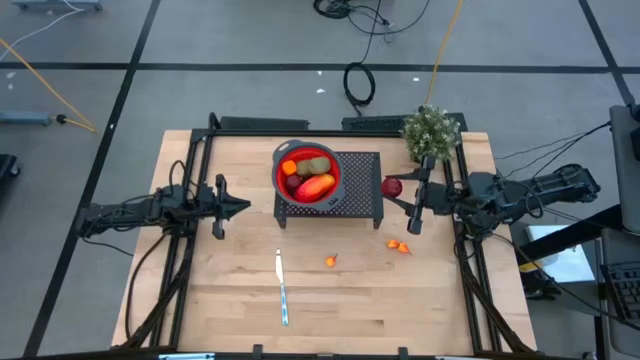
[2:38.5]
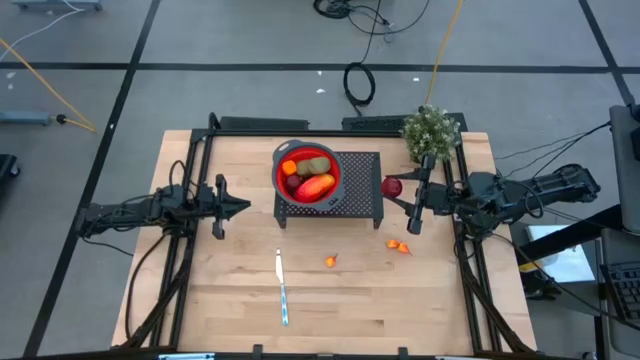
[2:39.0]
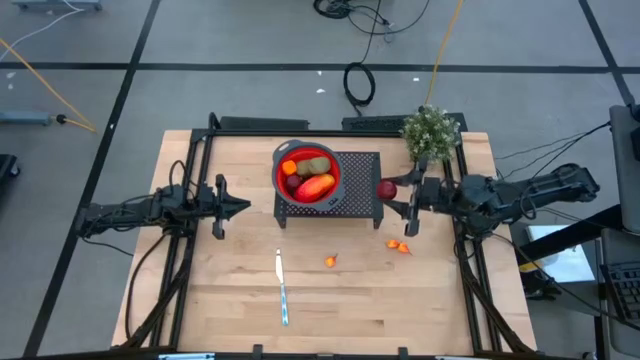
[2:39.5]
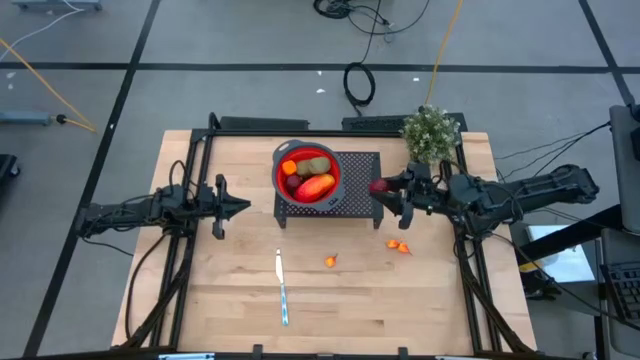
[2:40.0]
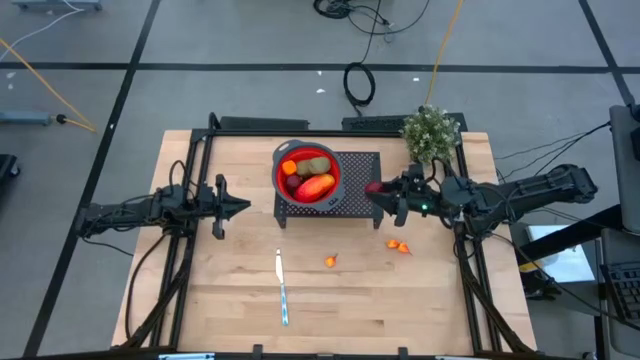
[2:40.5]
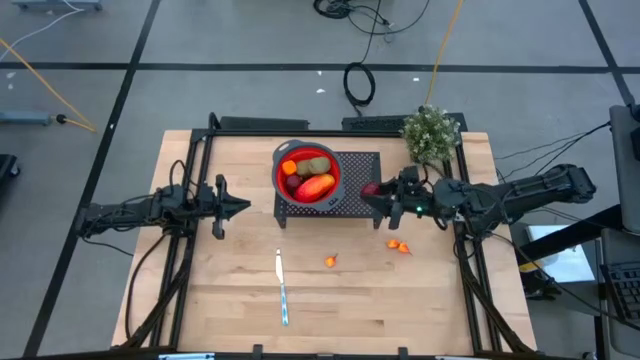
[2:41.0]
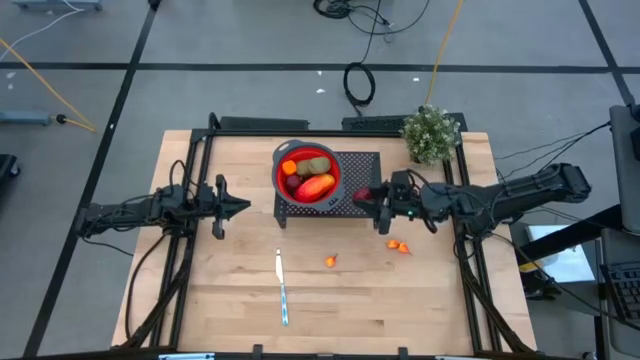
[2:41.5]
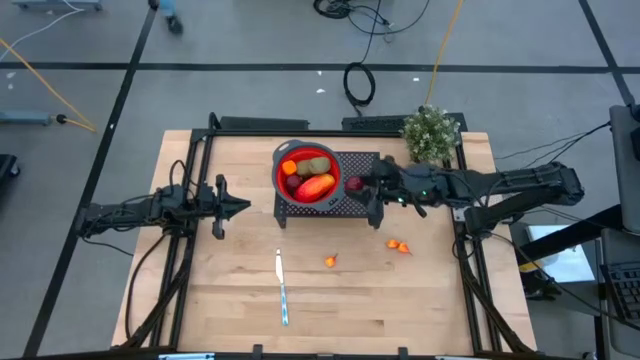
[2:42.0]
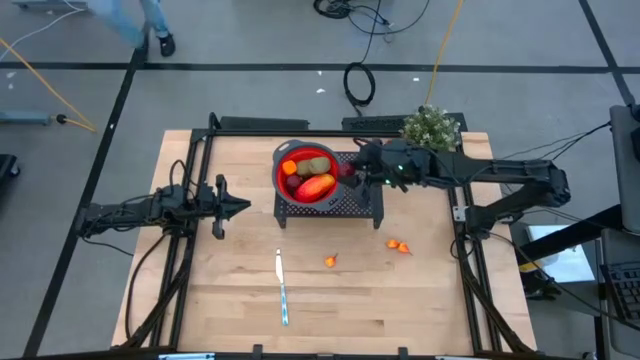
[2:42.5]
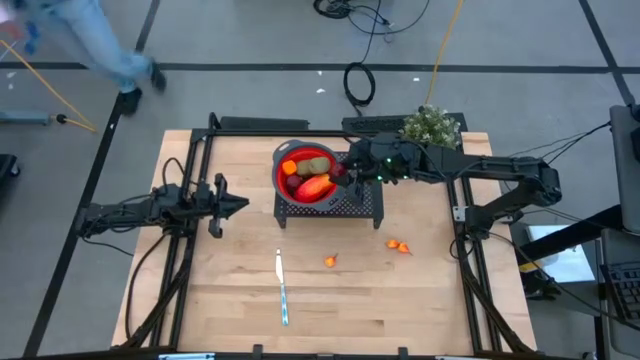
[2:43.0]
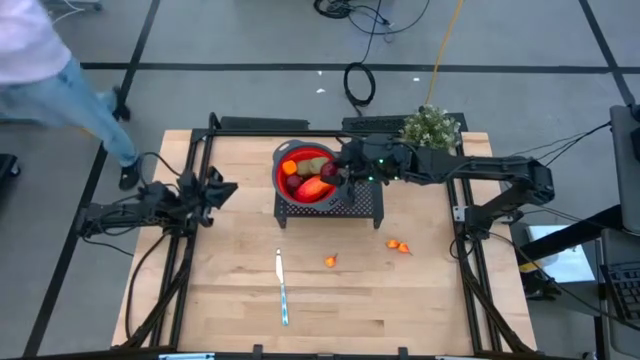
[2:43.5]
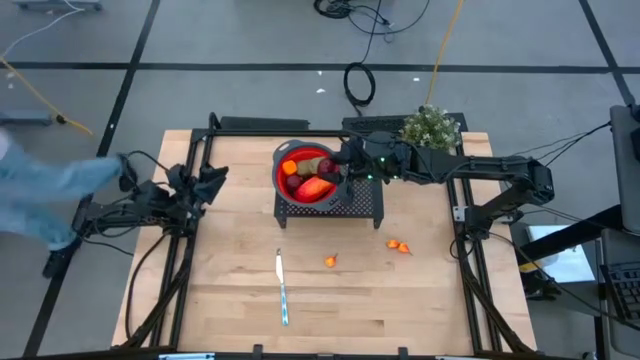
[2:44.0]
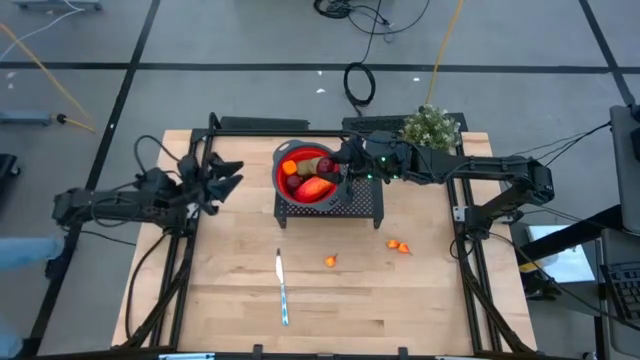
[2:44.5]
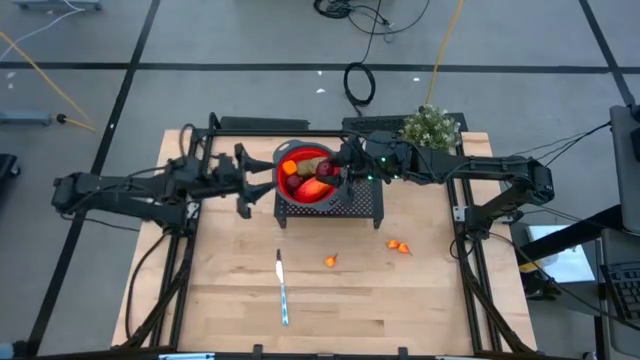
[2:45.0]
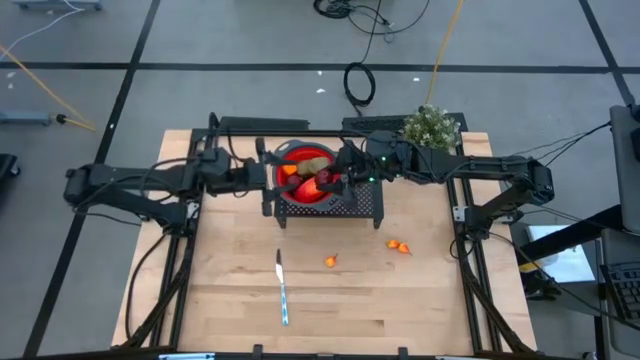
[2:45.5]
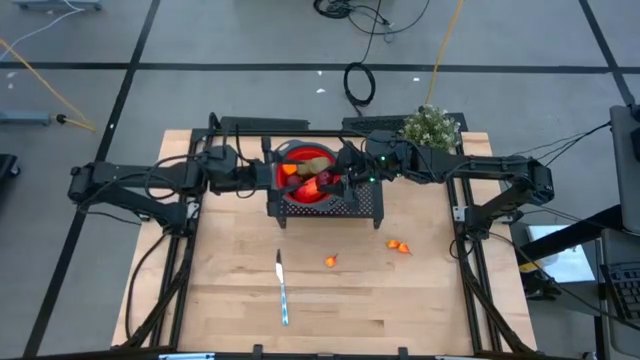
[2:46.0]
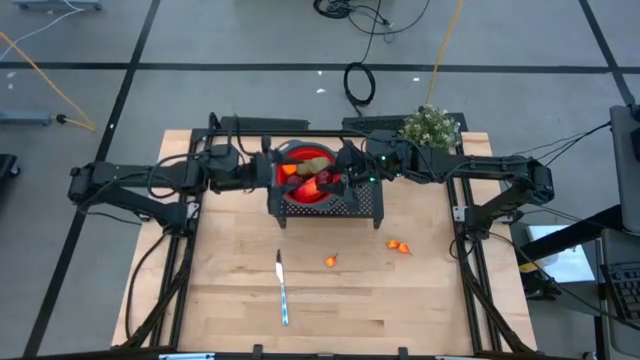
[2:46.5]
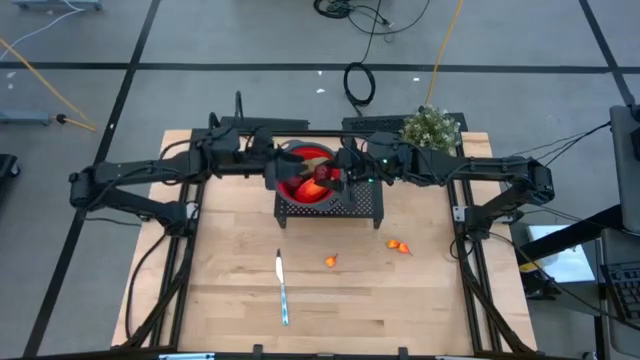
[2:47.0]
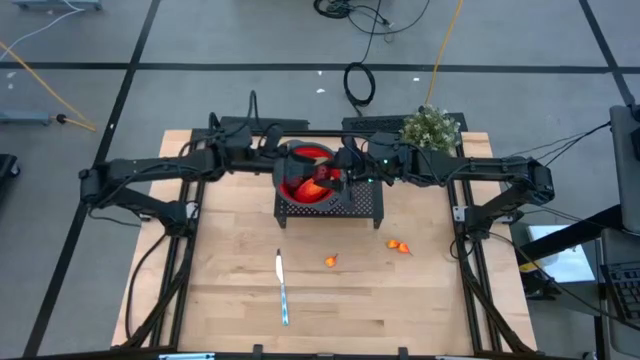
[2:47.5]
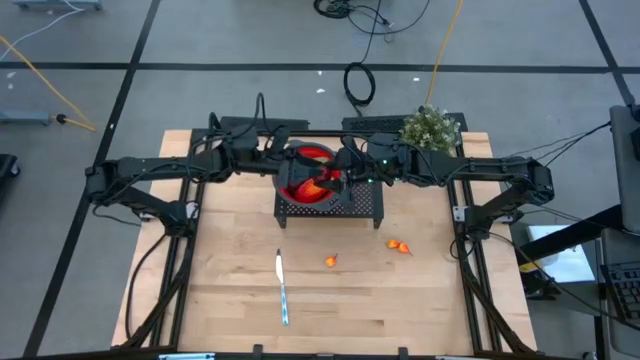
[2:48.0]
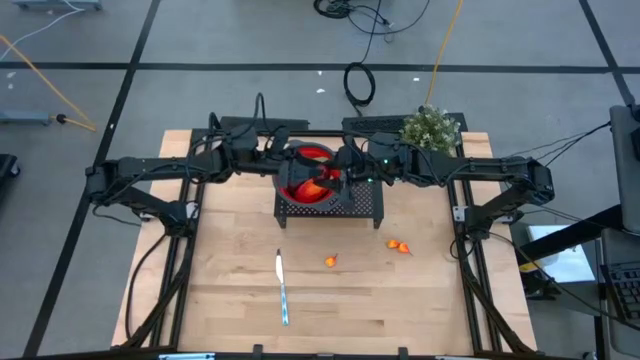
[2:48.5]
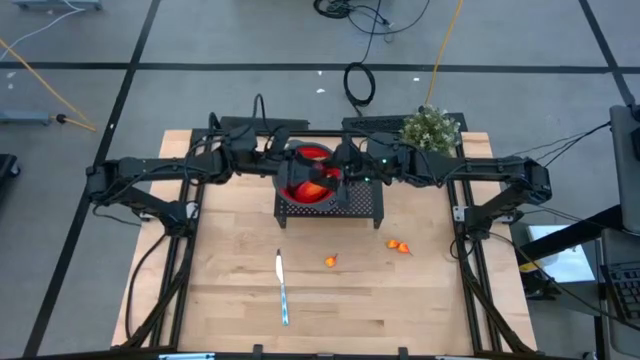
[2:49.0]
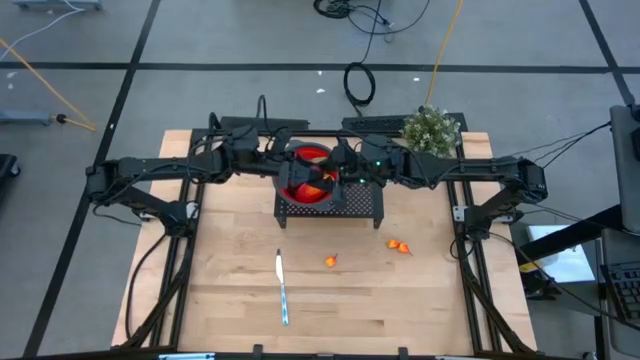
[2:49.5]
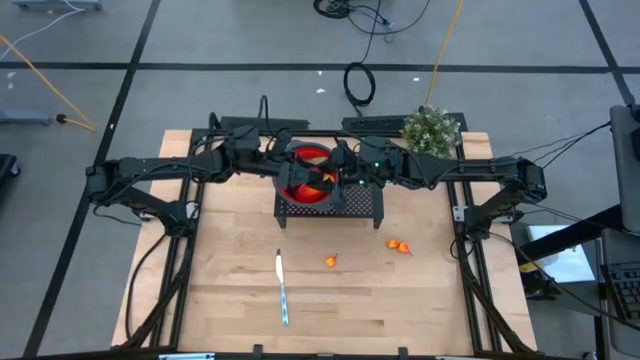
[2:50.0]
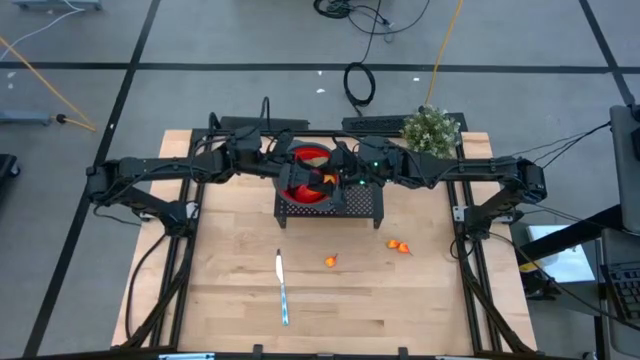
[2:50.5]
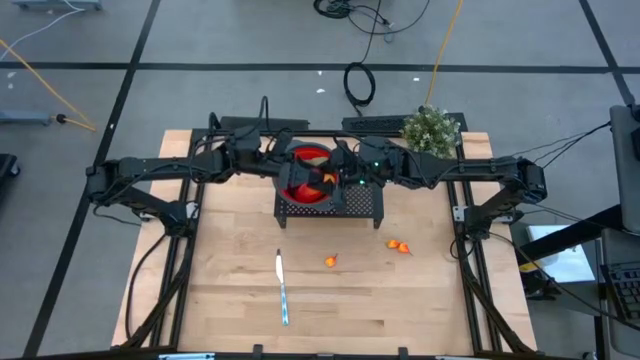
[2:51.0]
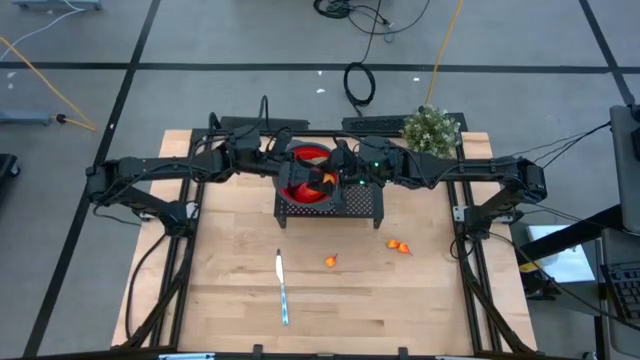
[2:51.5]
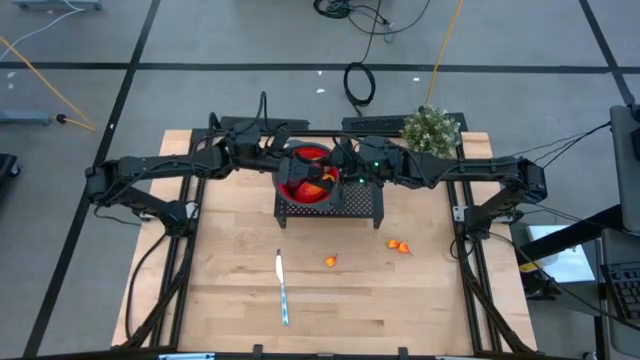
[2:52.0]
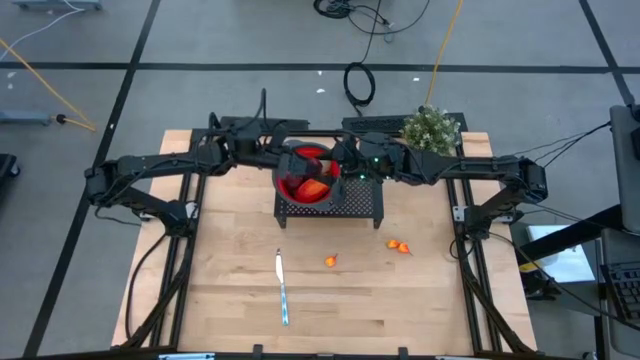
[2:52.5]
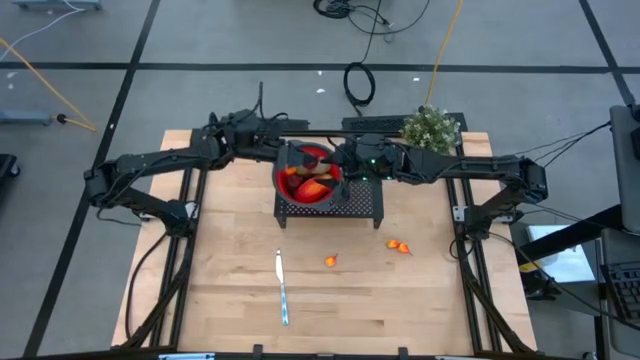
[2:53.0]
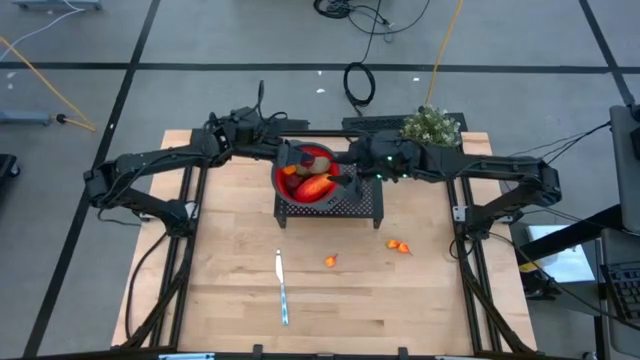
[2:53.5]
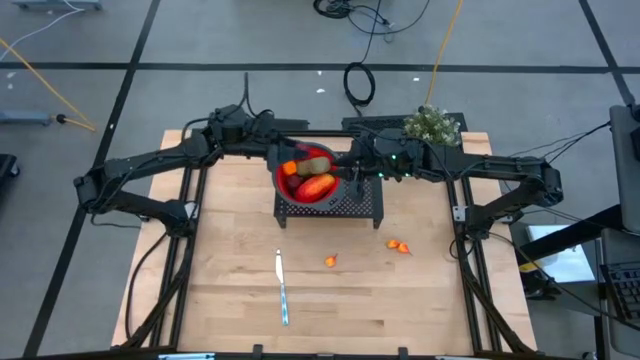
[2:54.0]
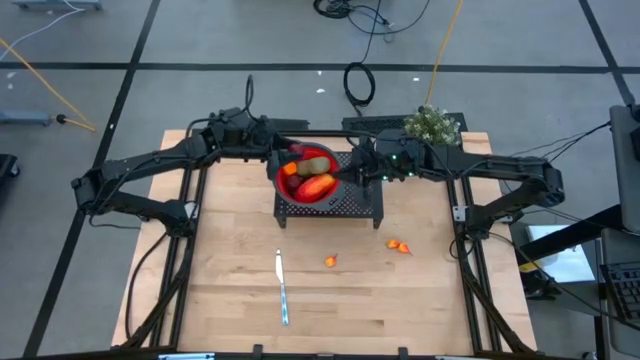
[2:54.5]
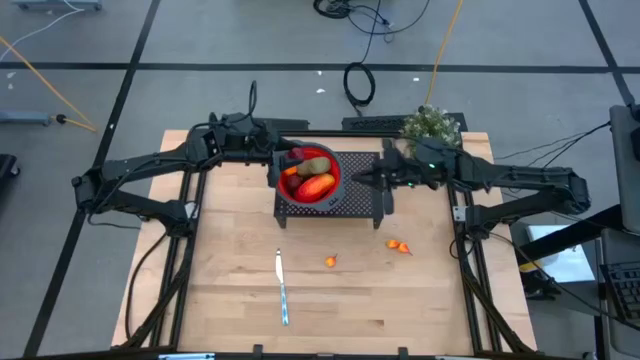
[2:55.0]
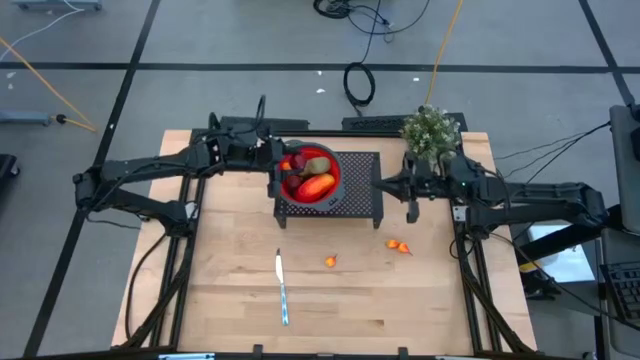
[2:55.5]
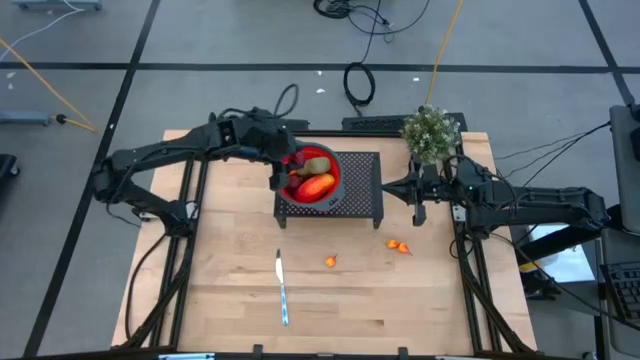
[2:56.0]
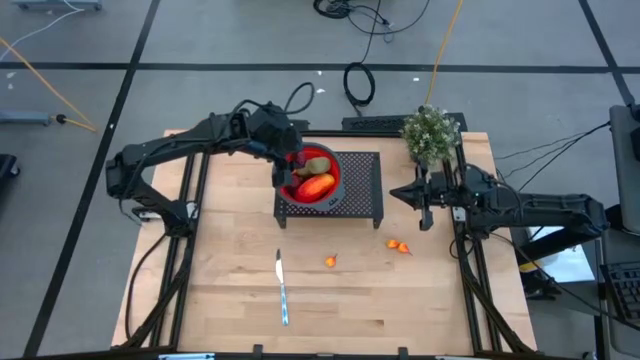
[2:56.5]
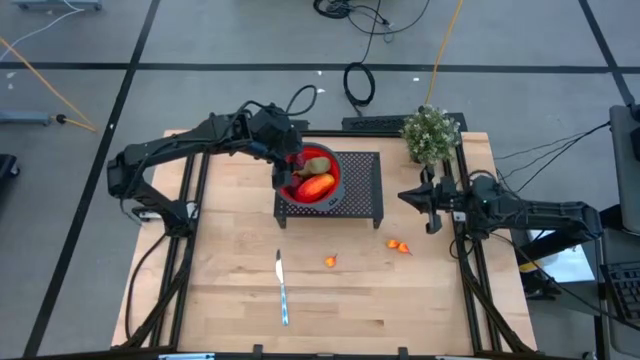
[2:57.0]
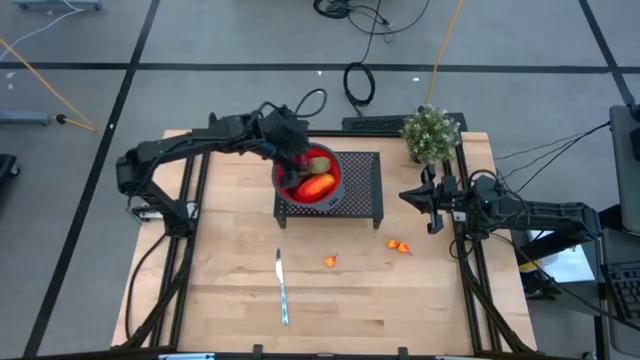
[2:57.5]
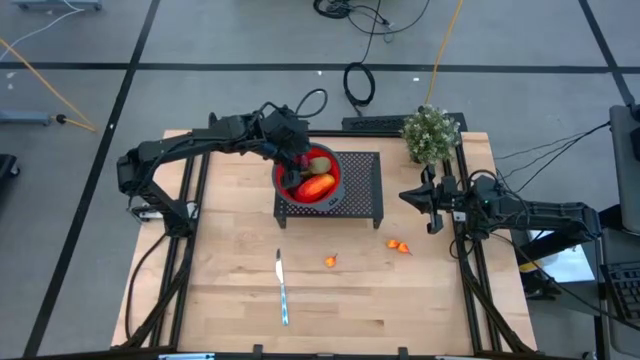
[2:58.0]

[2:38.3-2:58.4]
Task: Pick & Place Fruit
Put the pomegranate into the strainer on the shelf
